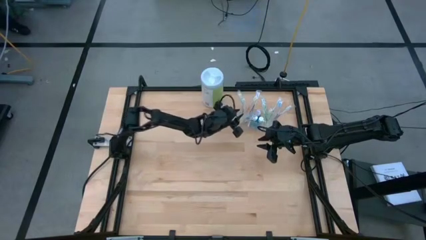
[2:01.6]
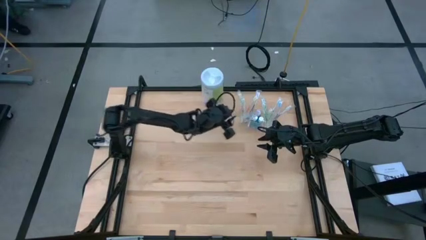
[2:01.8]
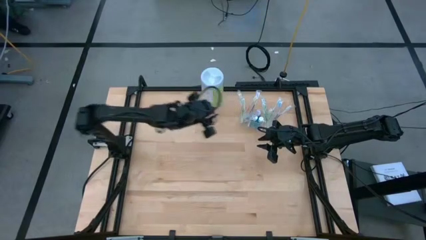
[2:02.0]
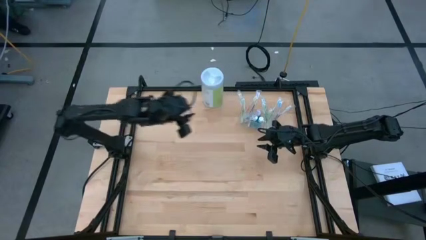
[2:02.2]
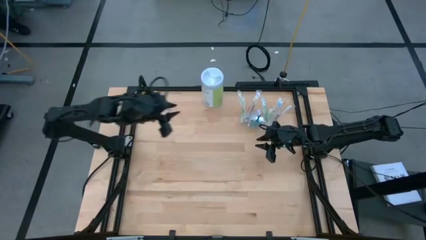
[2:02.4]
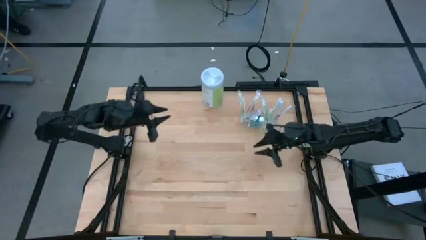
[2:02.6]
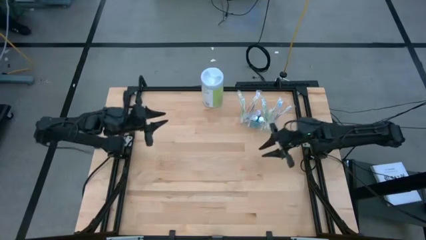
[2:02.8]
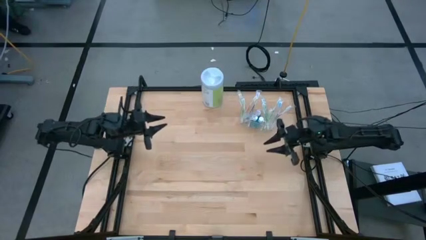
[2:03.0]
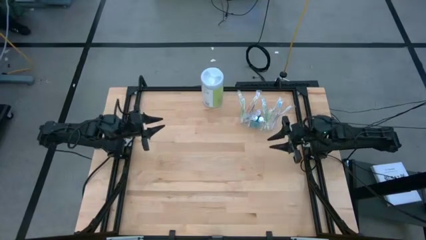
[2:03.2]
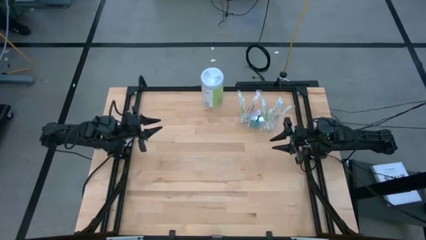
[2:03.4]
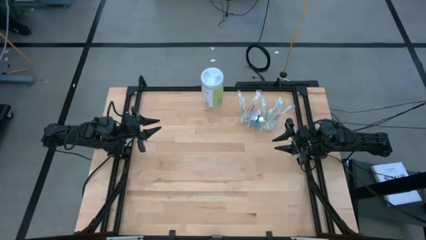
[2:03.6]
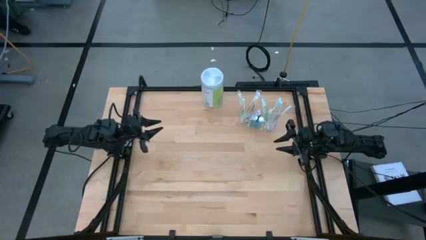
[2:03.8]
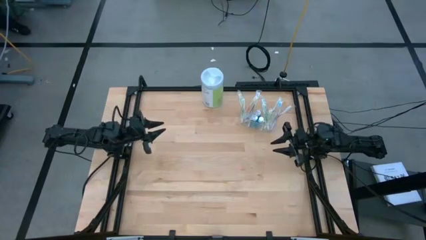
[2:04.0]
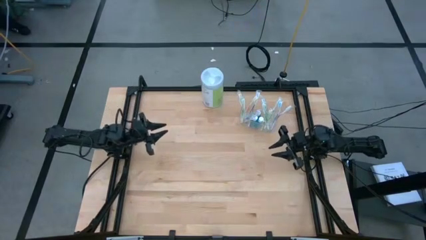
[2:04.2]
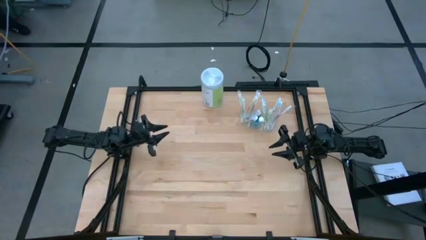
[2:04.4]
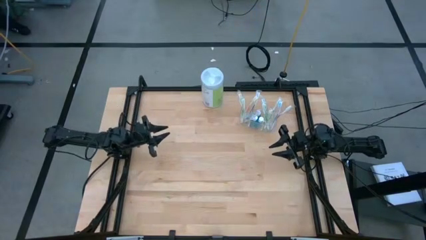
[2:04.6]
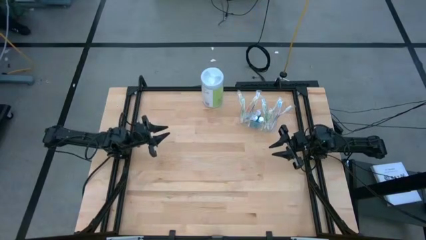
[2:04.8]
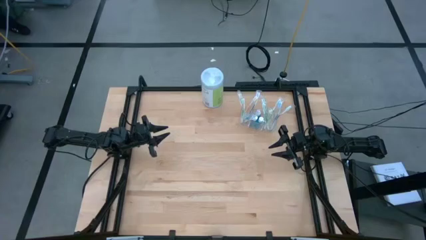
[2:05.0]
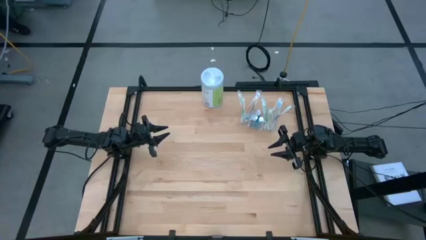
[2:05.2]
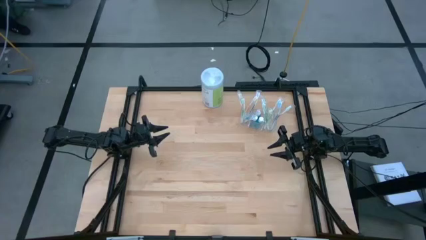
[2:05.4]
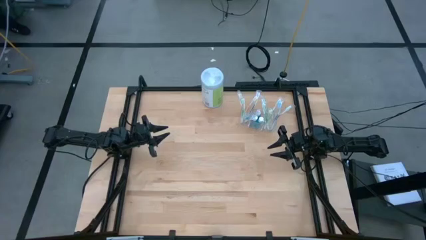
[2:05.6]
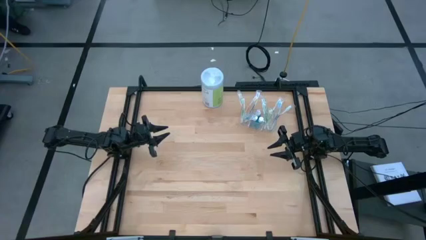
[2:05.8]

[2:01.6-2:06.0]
Task: Pick & Place toothbrushing station
Return to Home Position

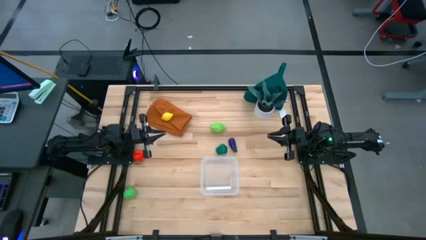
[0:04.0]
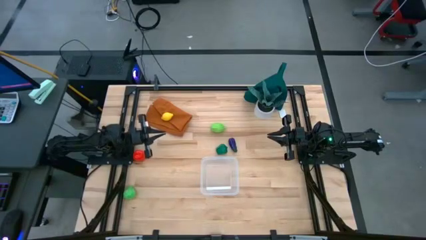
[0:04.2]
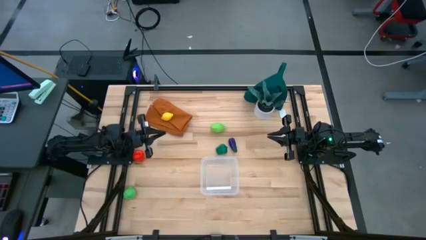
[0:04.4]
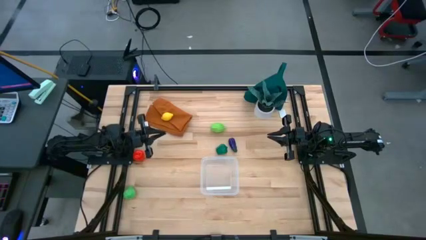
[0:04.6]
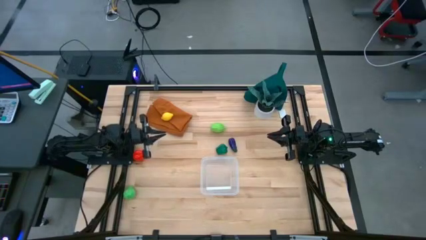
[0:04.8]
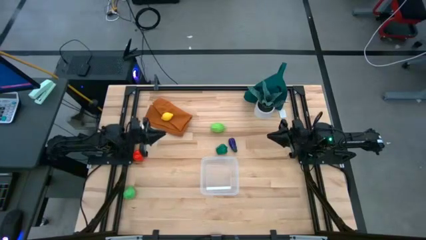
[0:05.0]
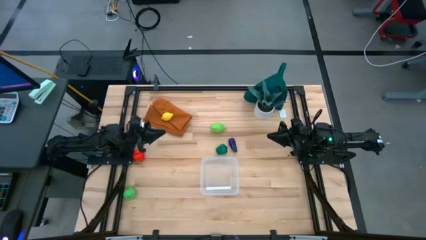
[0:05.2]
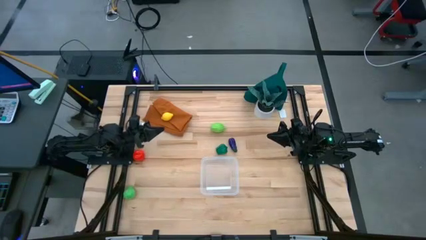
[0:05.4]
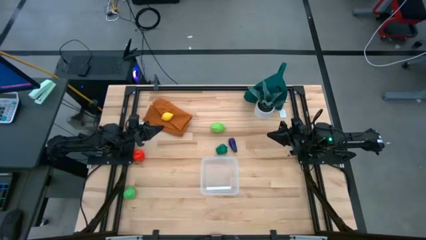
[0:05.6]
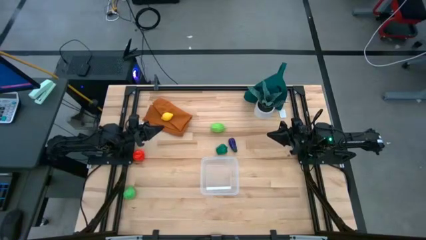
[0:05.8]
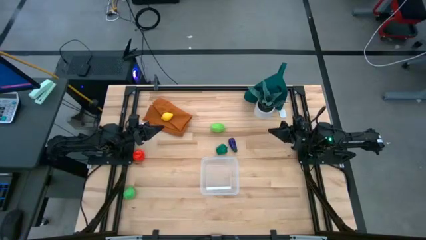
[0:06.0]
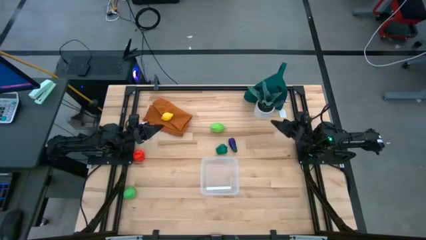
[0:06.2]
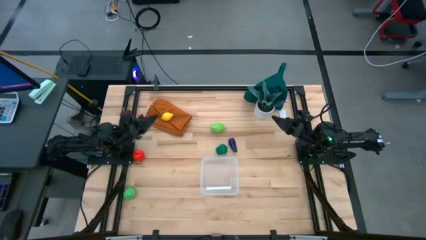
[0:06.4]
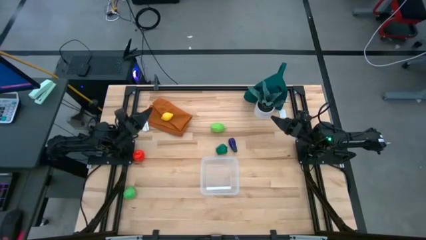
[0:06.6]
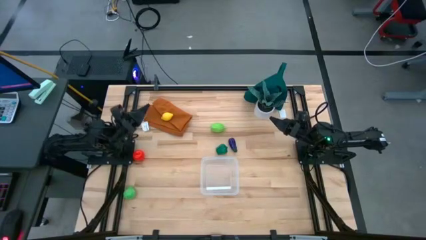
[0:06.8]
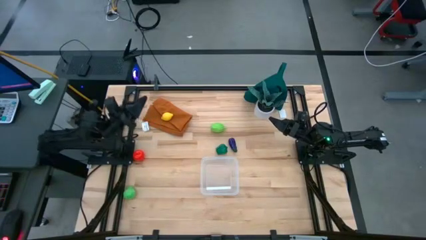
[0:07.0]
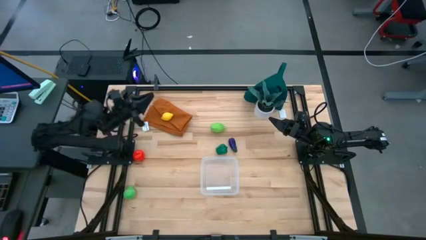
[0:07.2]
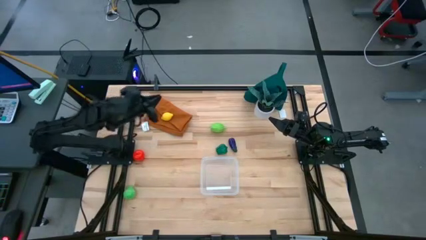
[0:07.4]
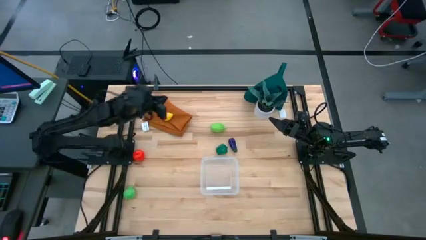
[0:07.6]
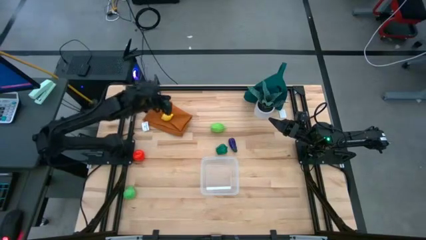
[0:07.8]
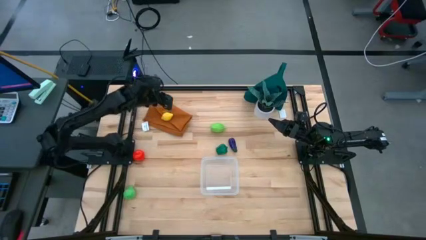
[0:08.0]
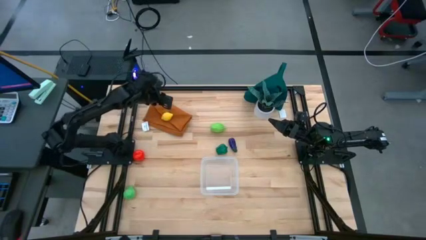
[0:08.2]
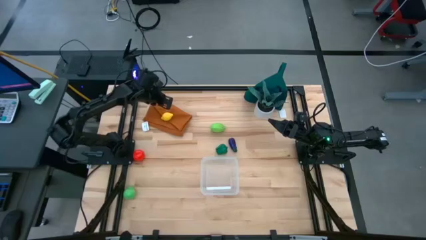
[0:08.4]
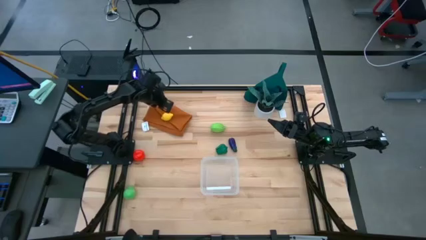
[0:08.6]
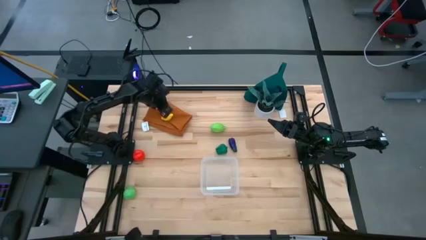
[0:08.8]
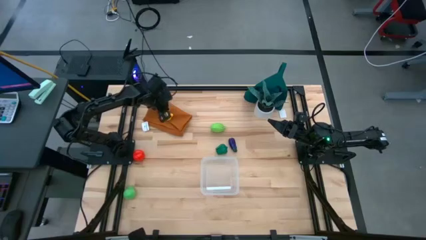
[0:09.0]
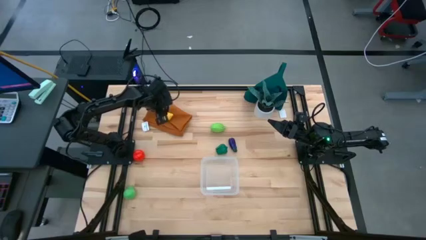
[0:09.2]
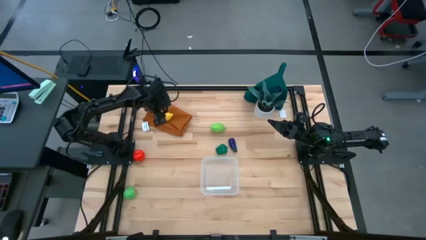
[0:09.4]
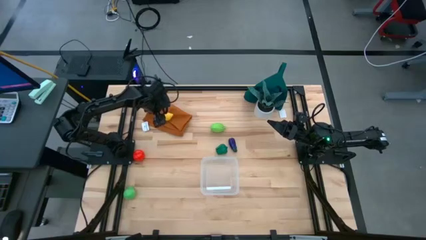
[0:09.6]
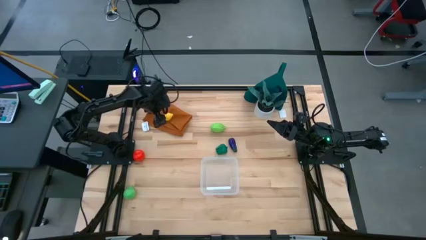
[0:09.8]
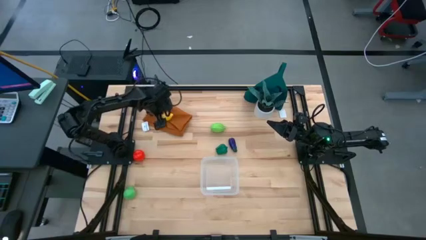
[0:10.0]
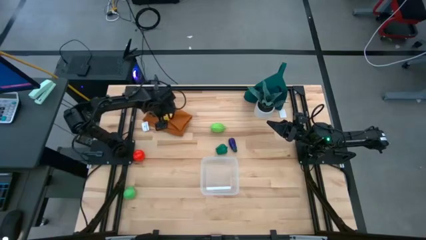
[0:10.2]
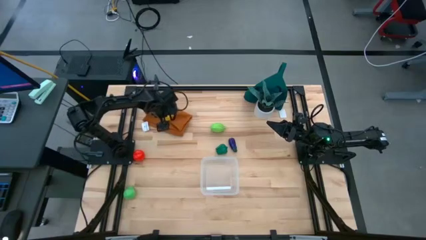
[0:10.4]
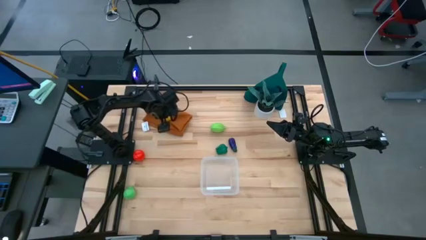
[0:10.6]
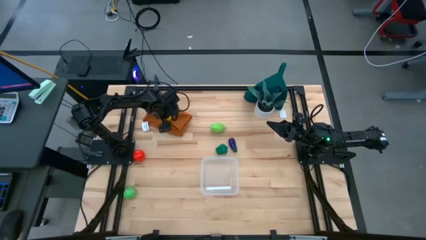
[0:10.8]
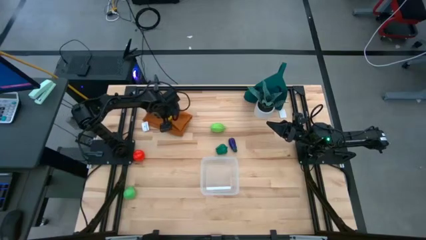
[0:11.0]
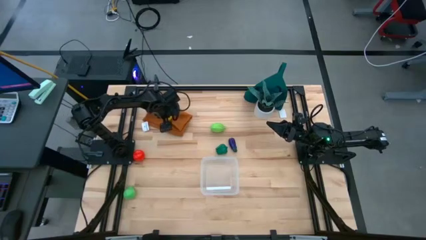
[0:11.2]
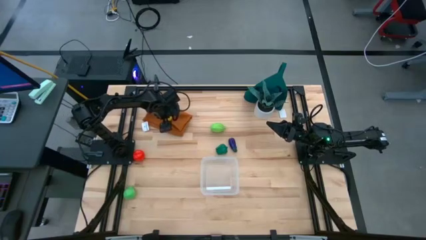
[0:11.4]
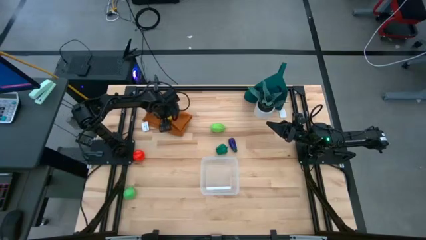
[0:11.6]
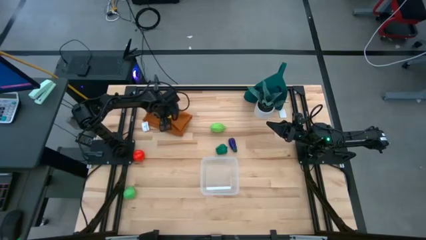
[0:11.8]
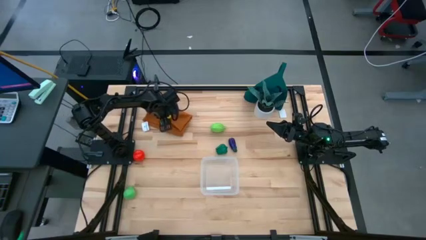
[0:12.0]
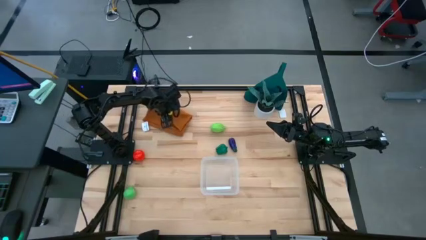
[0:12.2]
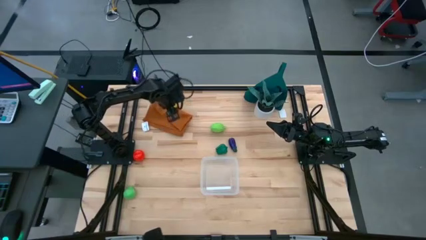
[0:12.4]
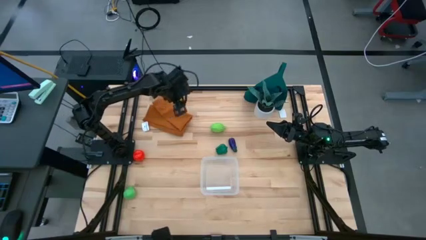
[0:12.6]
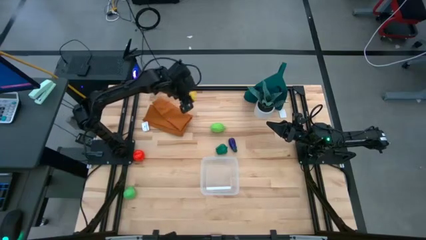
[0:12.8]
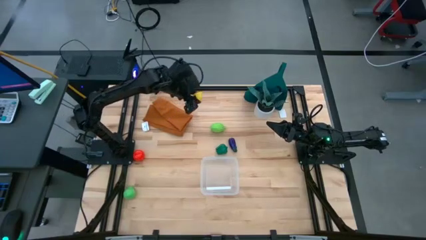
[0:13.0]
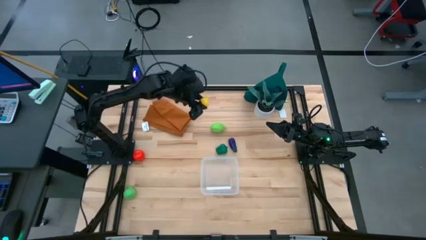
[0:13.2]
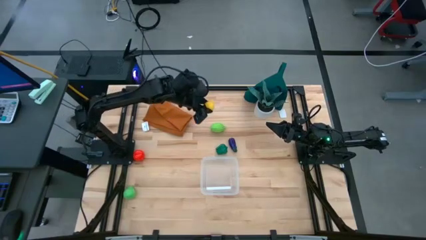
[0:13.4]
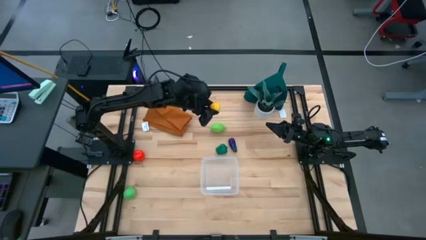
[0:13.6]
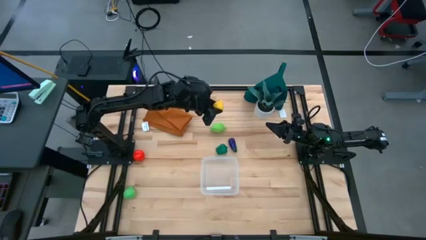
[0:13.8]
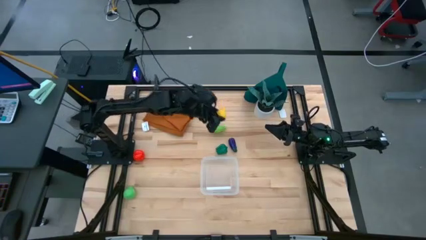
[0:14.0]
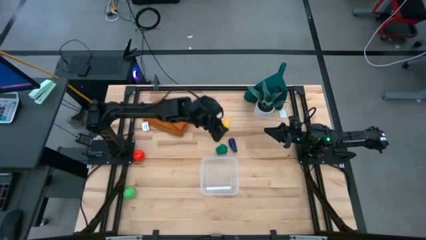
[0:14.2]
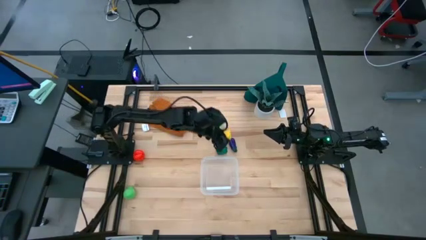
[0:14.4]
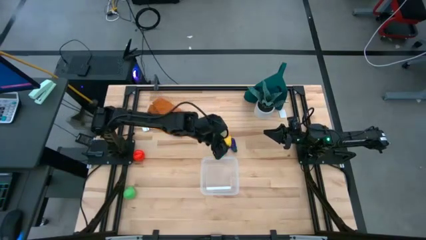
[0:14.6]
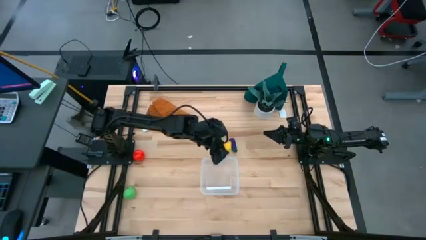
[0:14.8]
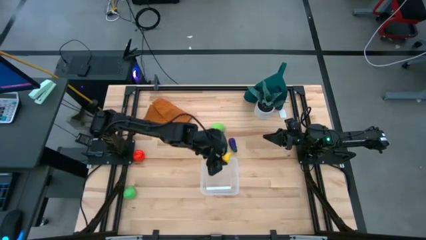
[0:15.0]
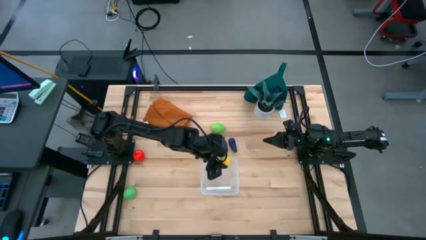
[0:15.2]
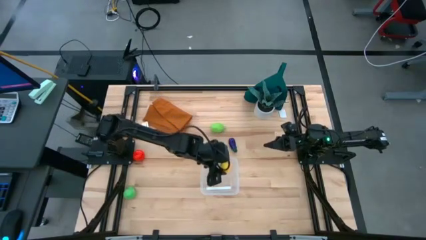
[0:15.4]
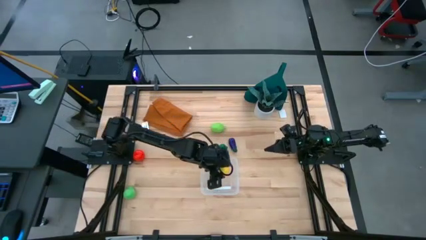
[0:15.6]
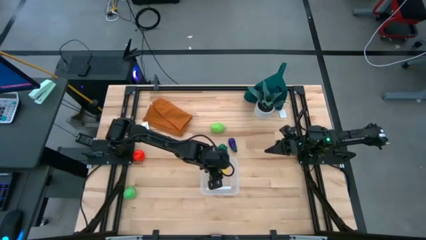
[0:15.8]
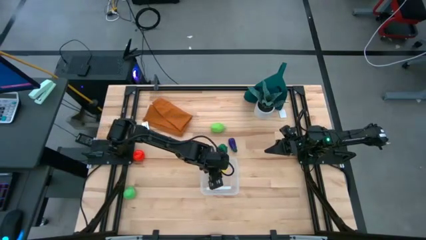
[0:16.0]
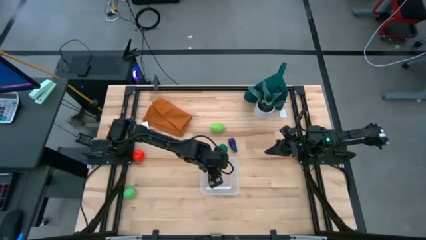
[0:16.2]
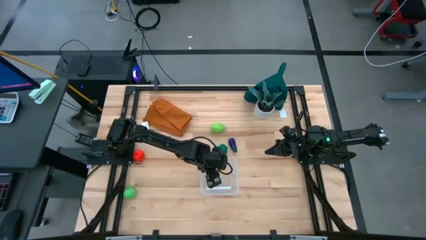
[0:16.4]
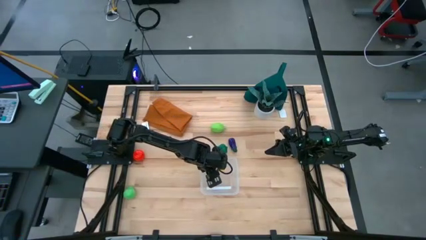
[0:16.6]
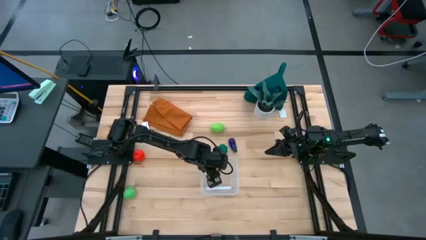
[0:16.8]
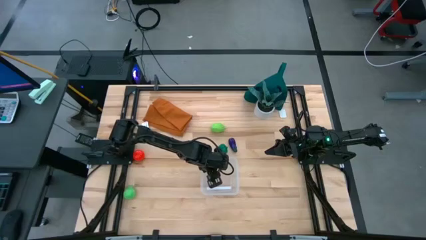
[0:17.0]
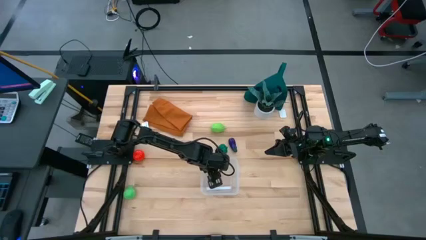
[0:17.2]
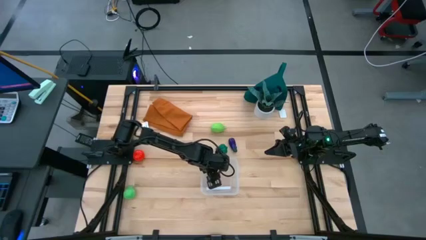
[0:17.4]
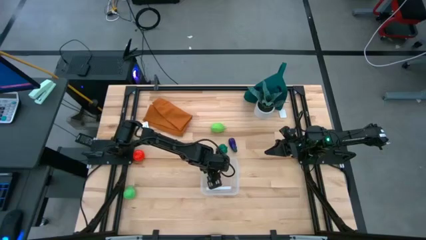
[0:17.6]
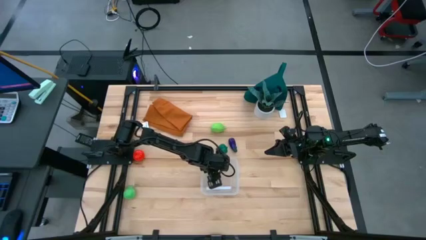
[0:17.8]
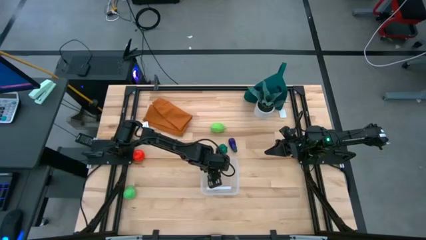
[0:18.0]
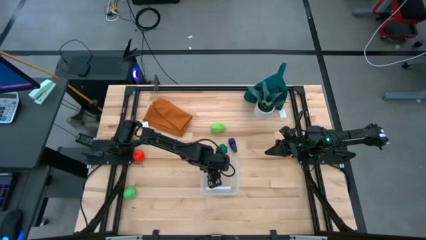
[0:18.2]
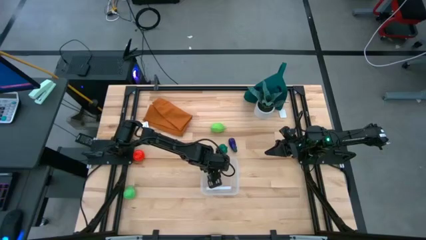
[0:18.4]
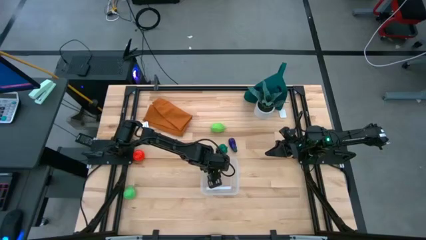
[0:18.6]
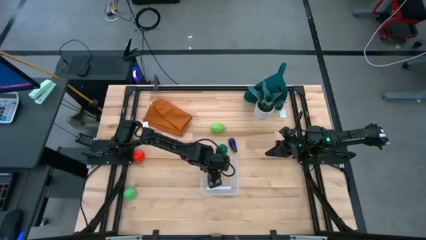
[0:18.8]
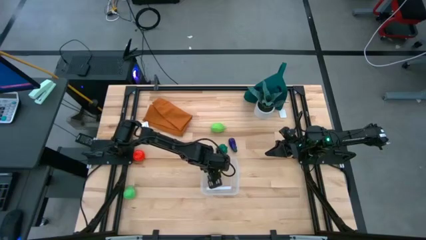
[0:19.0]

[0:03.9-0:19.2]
Task: Pick and placing Produce into tupperware
Put the lemon into the transparent bin
